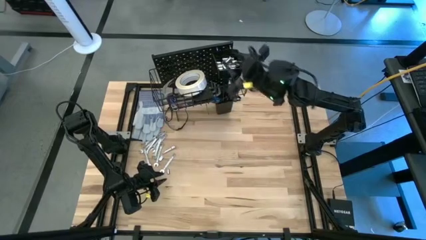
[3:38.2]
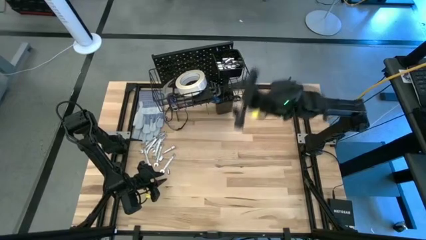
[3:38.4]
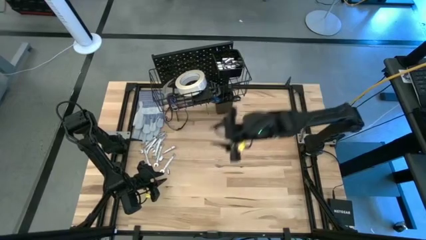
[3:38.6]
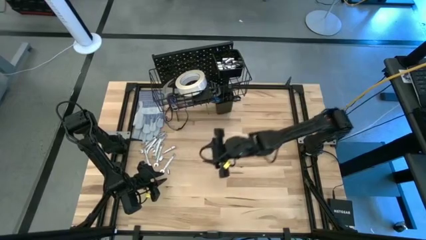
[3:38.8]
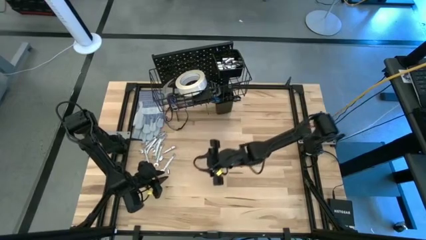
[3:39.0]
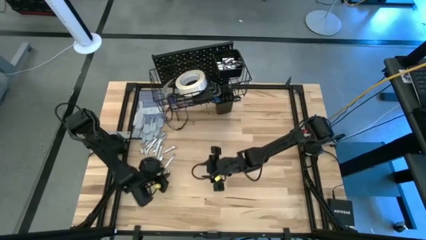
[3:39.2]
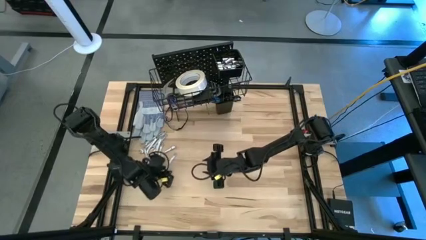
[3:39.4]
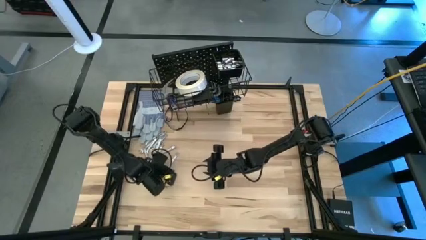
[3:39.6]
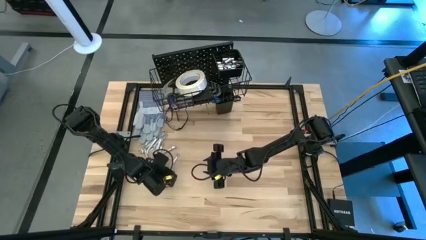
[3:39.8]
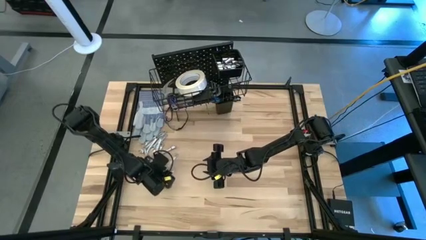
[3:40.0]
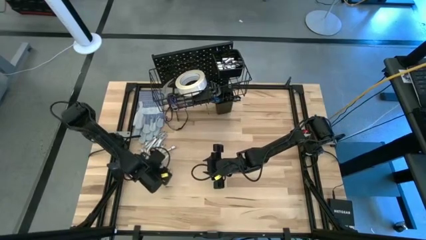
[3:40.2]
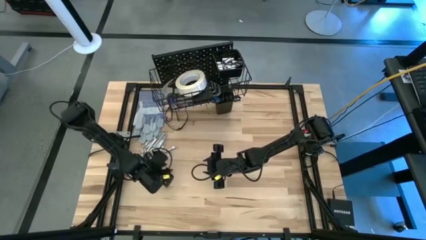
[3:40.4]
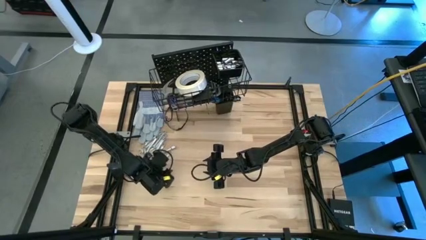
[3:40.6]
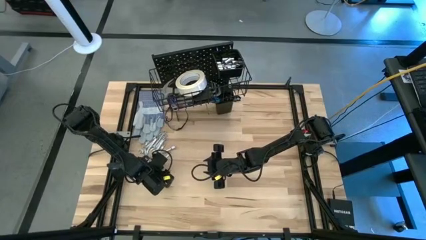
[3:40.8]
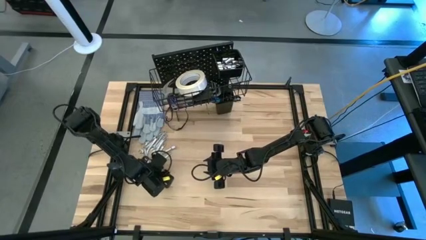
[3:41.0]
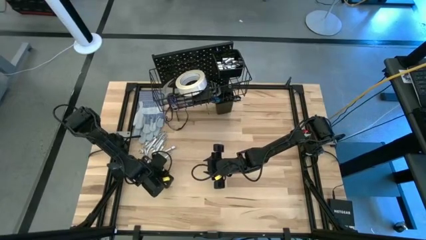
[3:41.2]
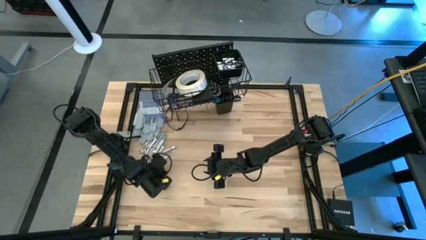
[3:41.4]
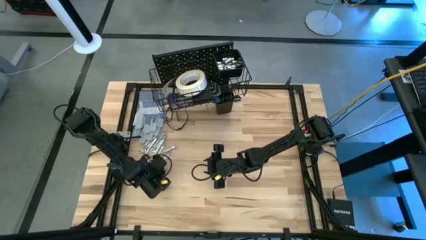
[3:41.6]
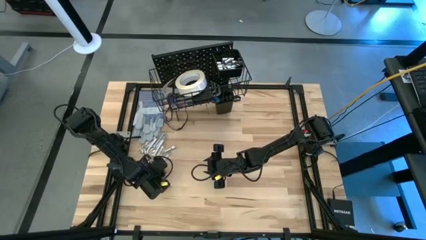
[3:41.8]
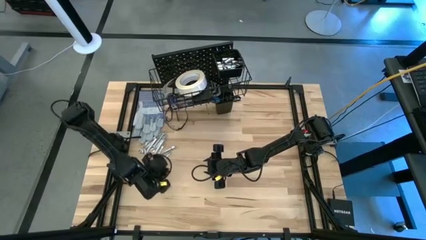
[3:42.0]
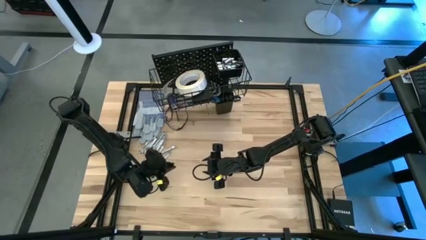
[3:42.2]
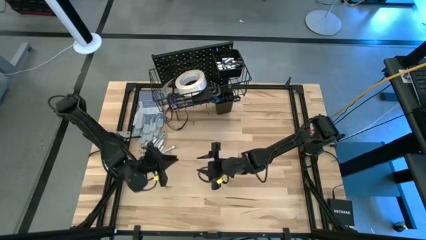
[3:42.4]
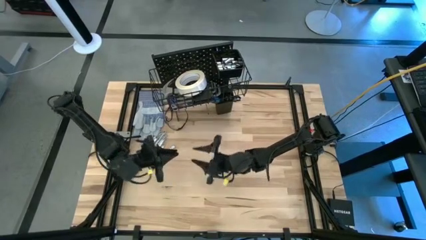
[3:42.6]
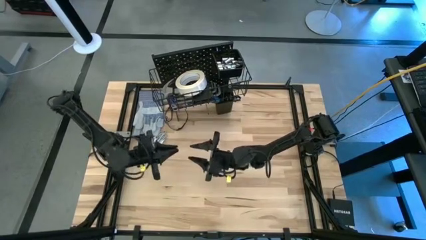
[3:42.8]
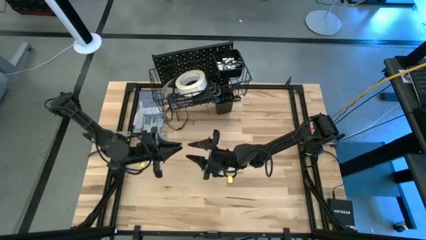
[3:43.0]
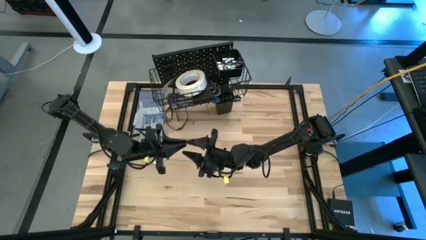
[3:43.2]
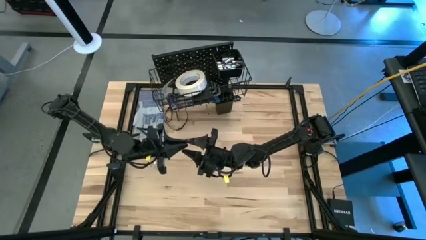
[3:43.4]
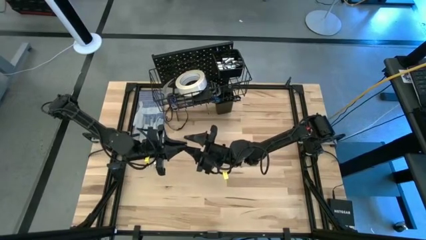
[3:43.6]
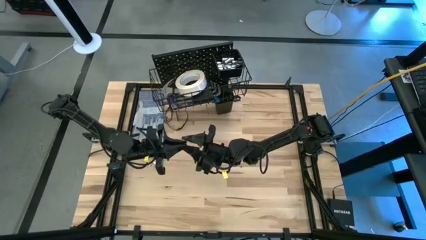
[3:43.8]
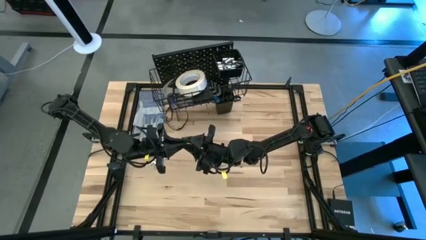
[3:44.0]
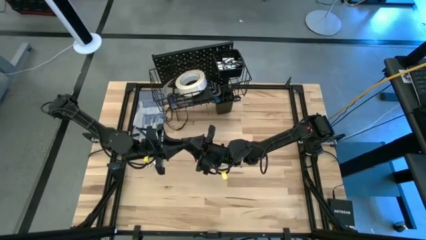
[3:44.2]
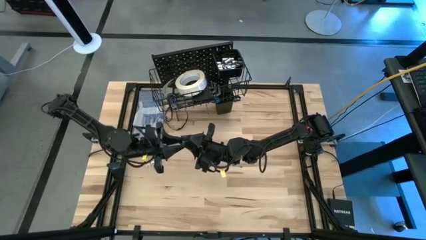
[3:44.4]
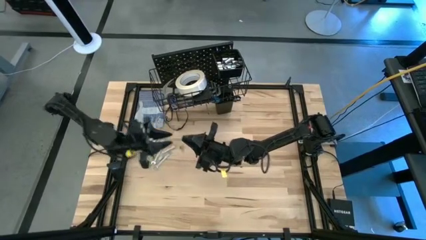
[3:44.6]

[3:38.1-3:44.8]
Task: Hang tools onto peg board
Put the socket into the top black bin on the pegboard

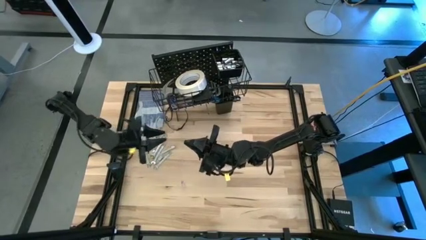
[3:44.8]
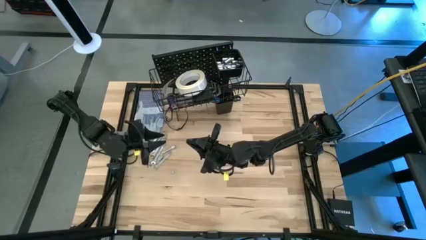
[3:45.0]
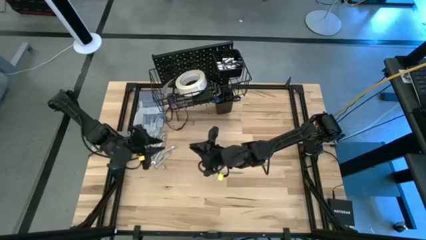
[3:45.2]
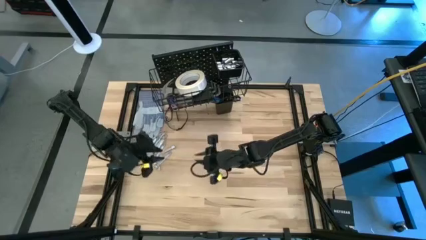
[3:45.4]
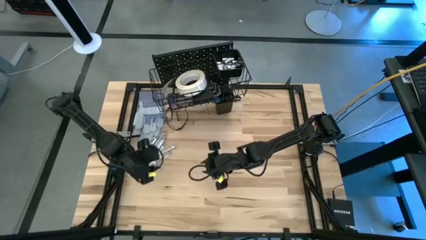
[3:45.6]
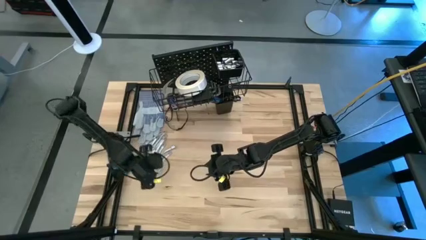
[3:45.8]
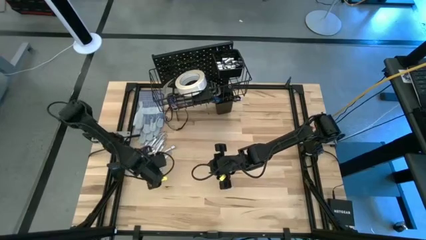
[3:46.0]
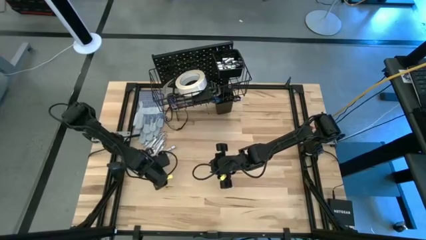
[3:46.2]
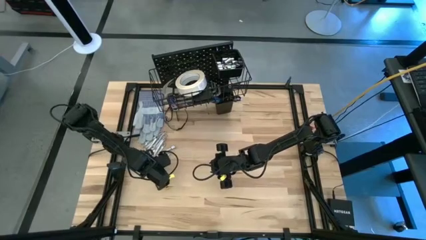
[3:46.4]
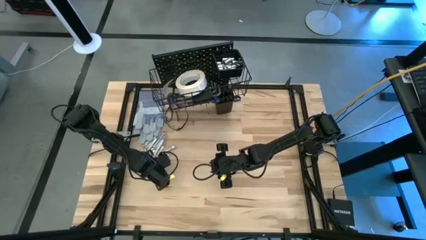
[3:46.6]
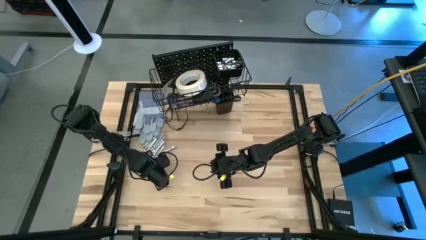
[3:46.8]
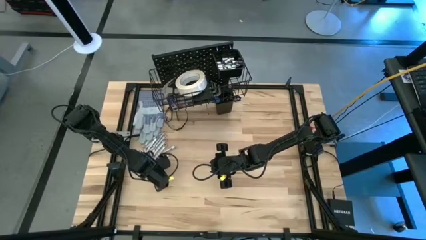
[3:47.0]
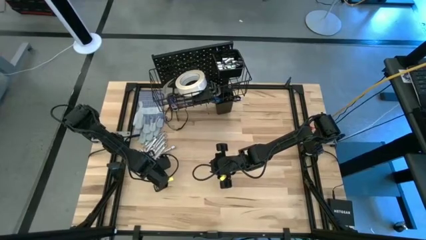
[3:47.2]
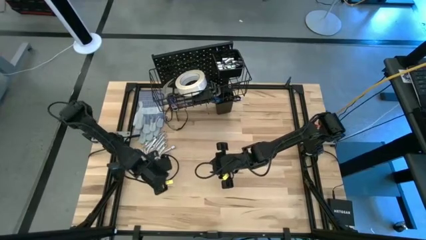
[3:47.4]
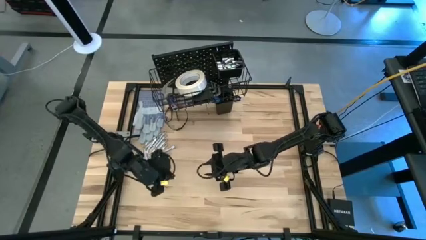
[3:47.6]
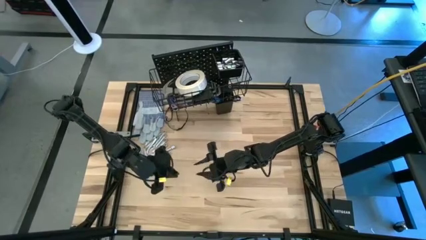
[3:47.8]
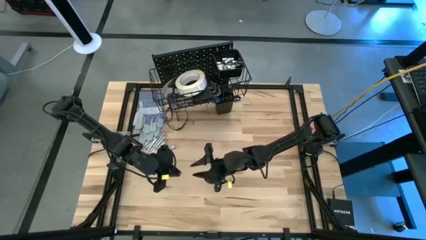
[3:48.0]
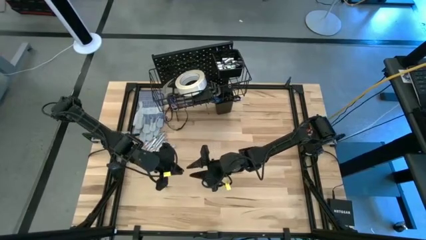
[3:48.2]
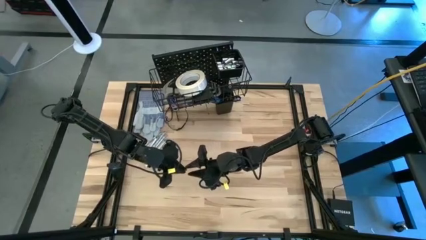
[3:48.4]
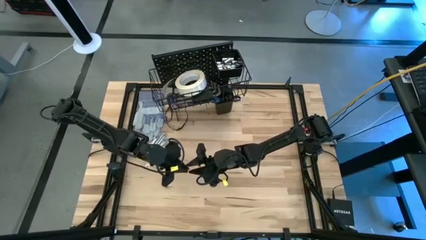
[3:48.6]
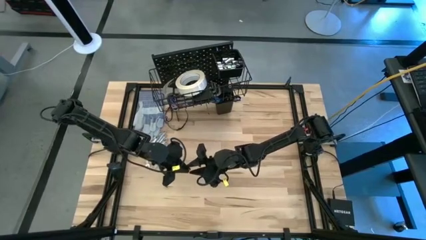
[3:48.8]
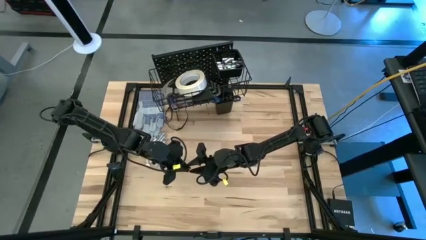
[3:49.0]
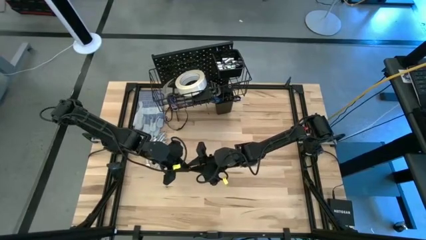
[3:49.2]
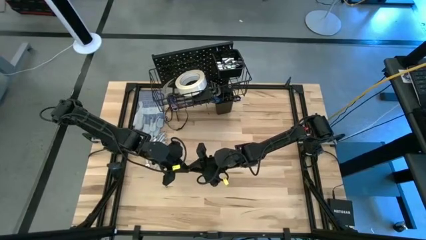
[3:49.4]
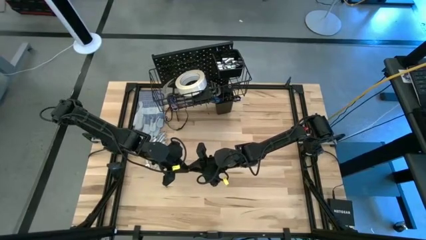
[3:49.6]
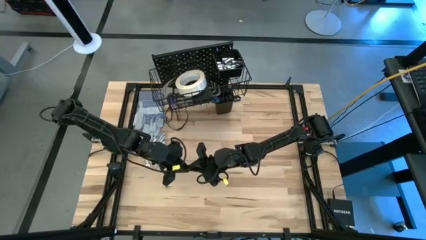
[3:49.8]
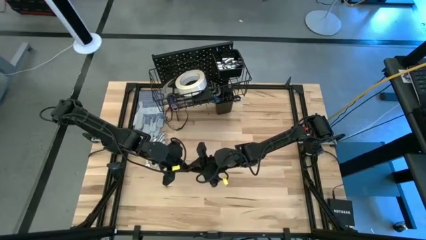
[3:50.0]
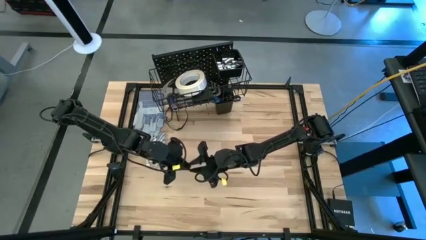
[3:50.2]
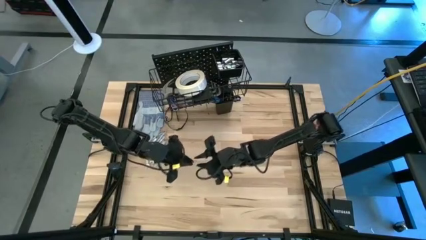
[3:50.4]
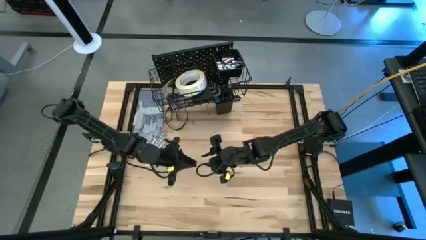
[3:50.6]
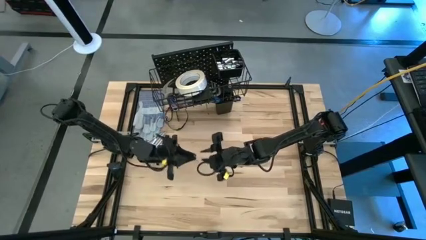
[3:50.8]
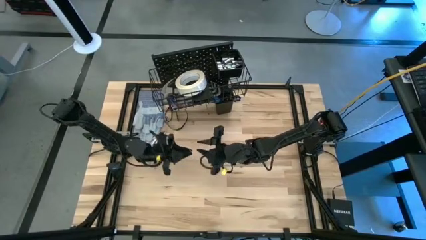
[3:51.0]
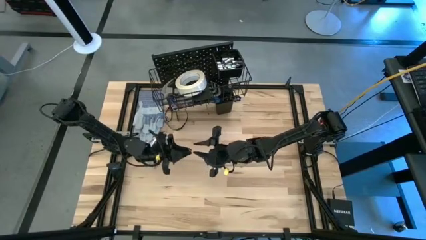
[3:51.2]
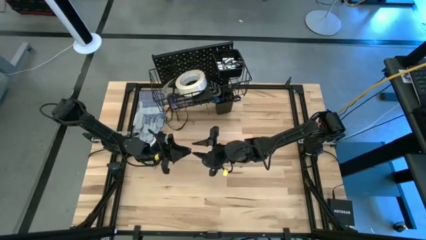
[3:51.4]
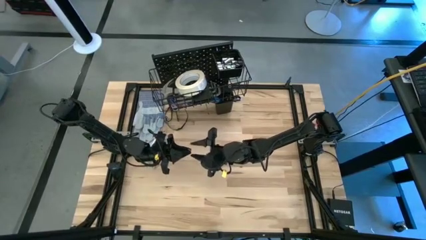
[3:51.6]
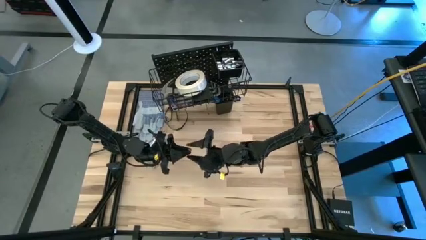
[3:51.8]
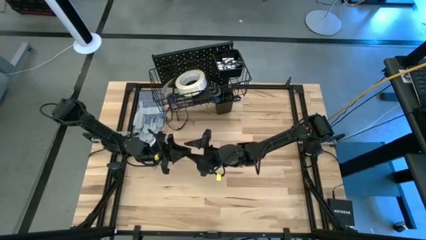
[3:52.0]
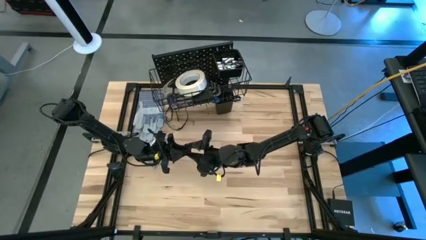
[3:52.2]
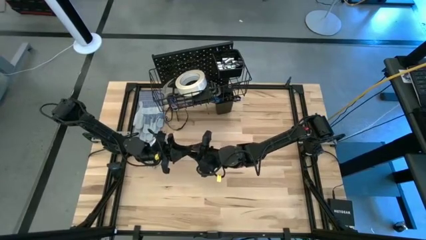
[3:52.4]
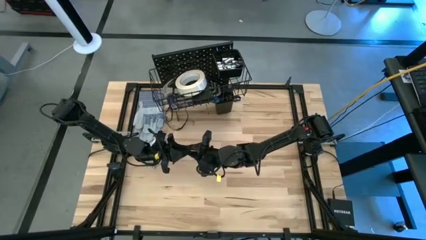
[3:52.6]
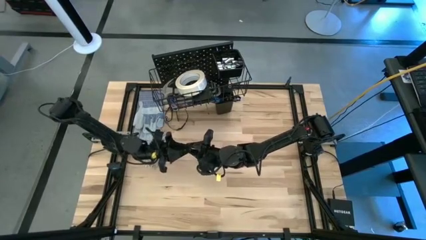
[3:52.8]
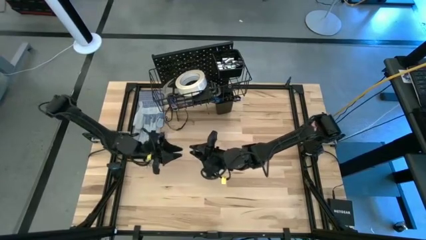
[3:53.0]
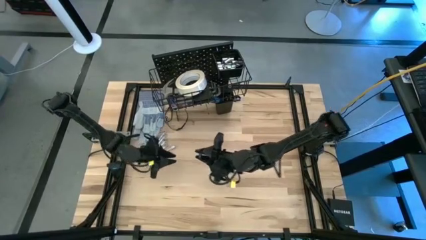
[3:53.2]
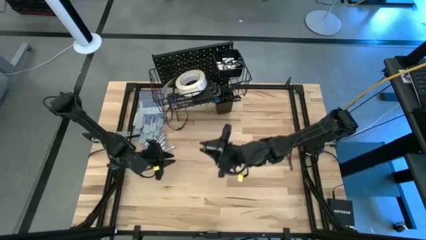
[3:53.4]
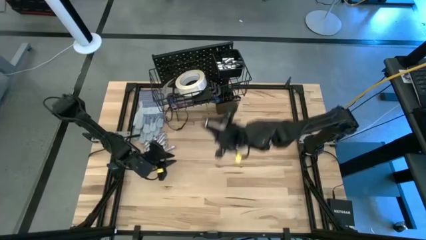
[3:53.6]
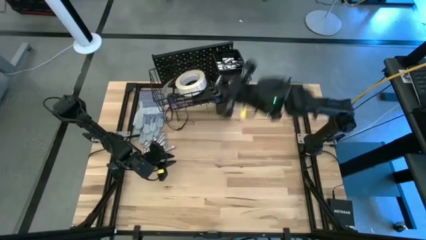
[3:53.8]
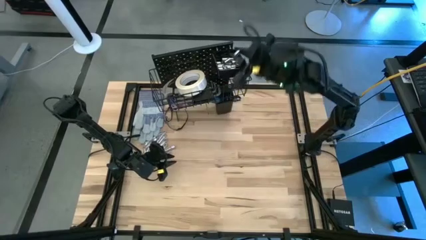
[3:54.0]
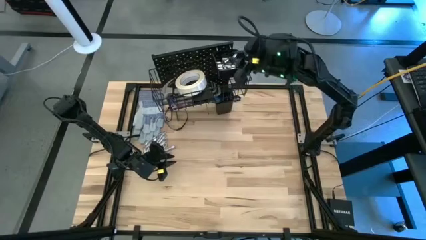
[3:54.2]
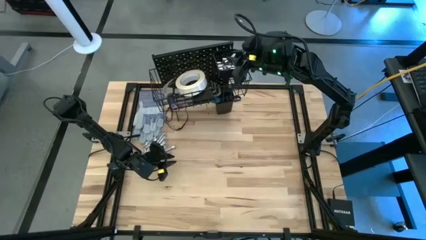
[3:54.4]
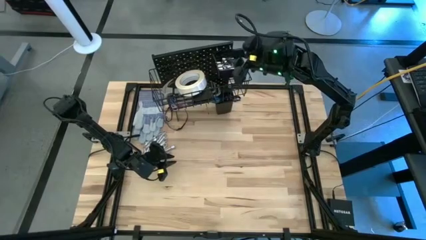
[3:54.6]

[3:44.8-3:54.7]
Put the socket into the top black bin on the pegboard
